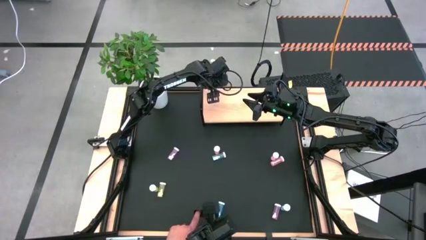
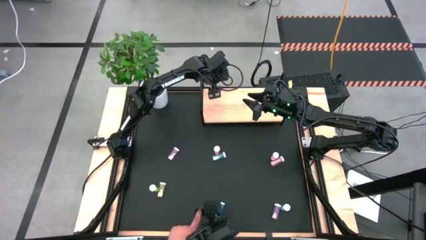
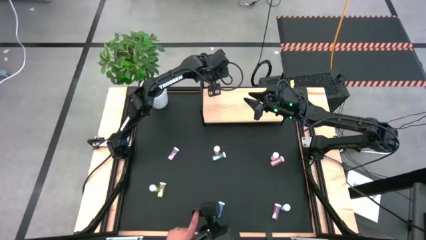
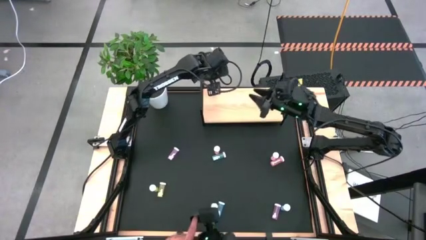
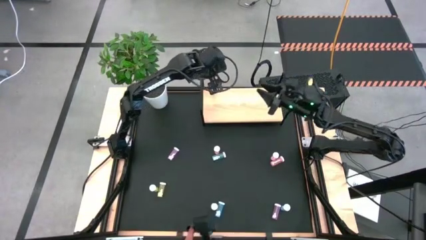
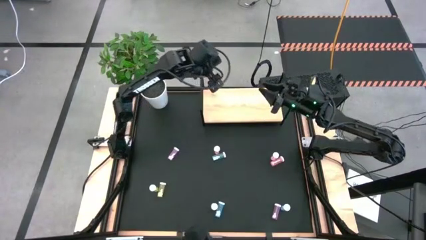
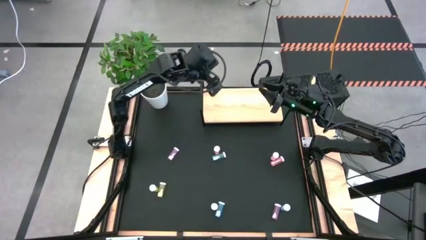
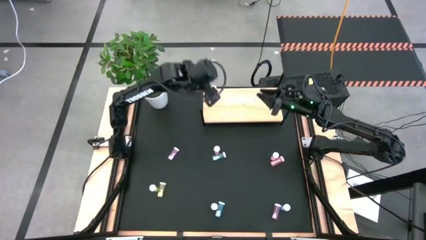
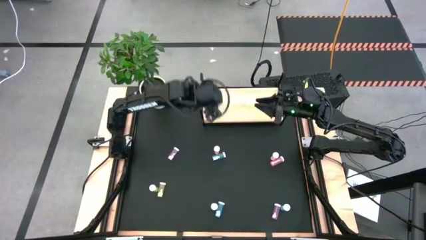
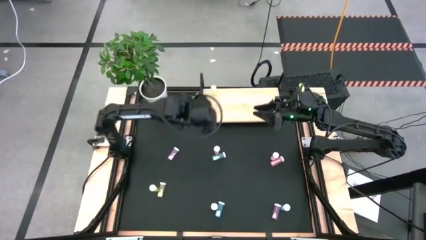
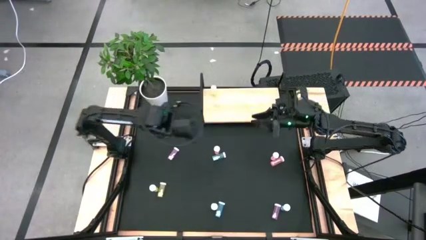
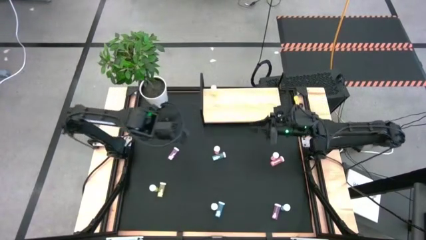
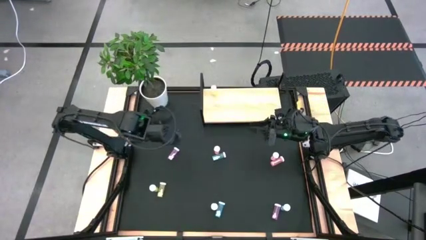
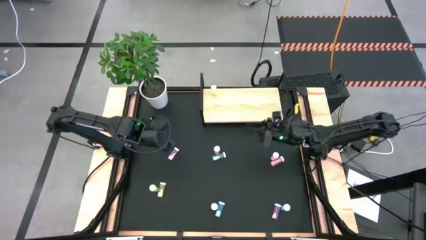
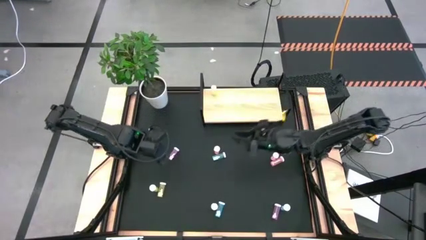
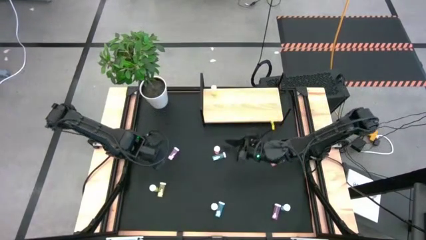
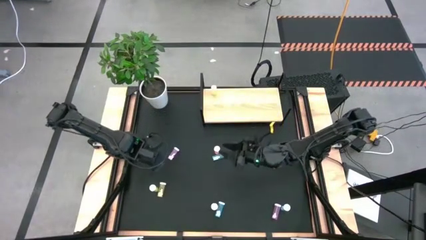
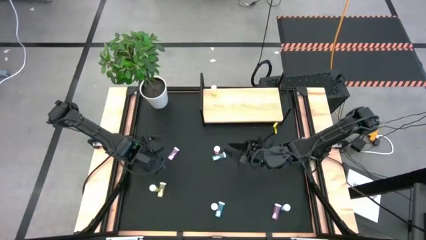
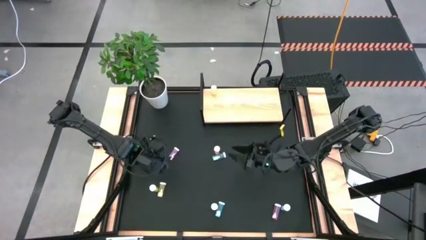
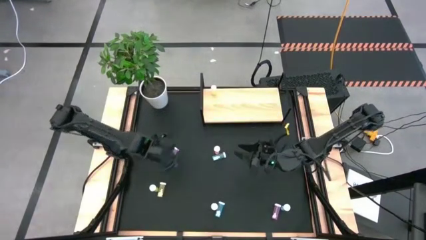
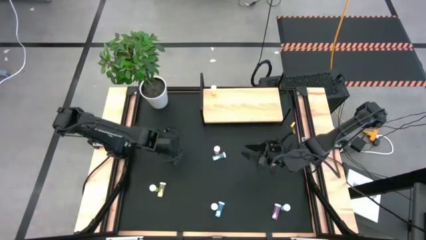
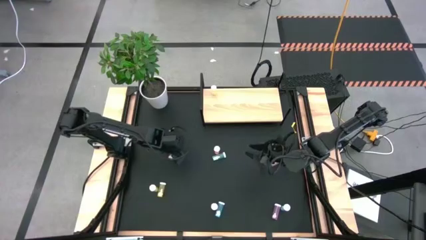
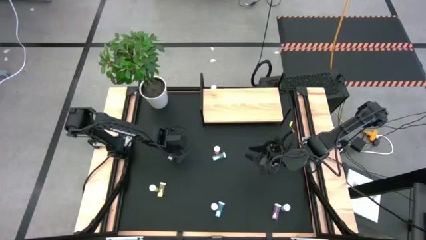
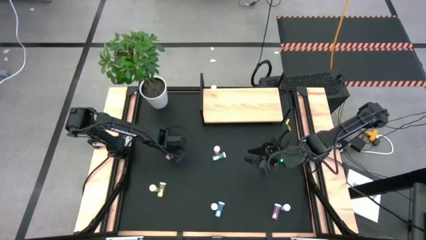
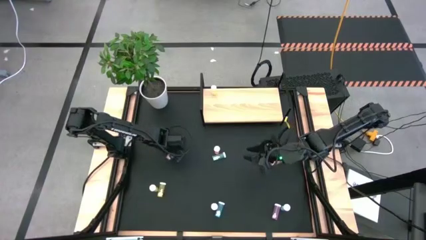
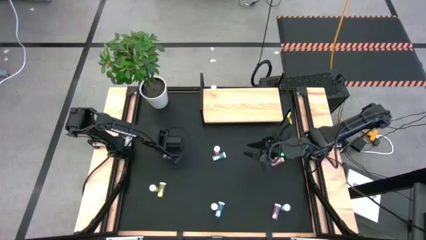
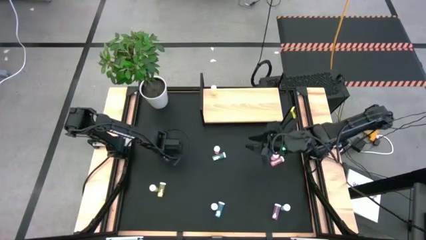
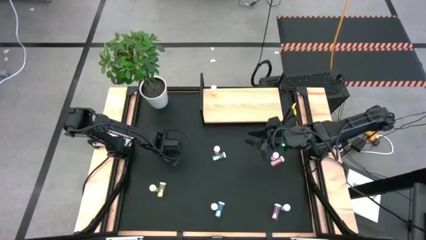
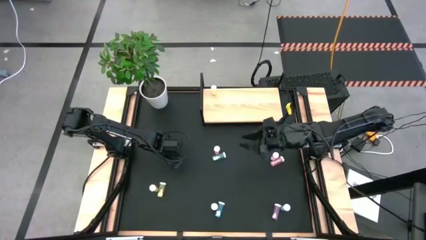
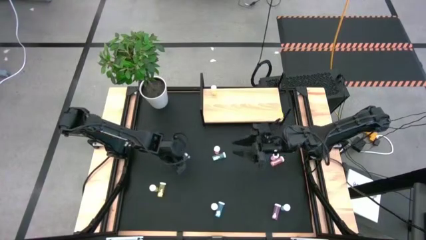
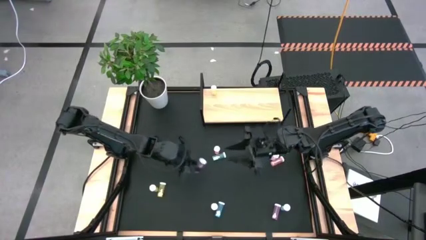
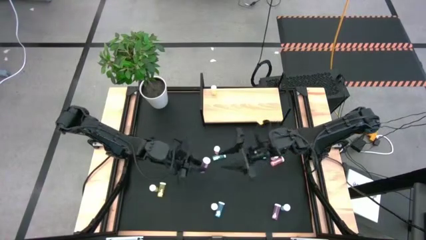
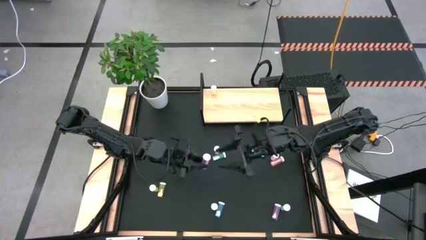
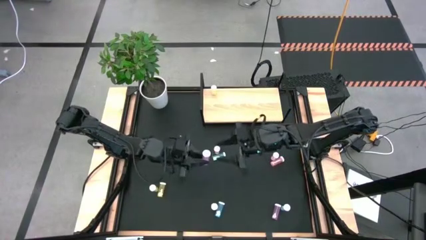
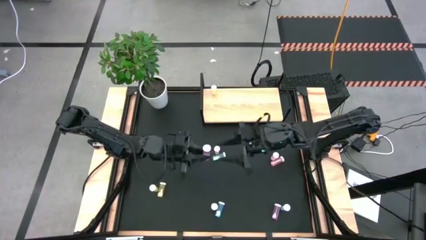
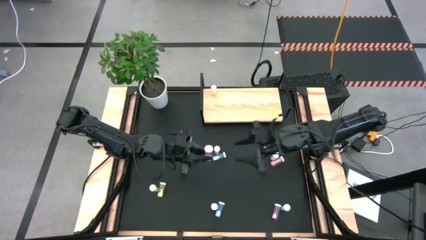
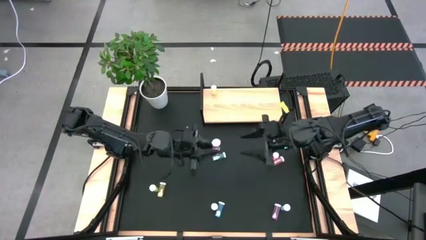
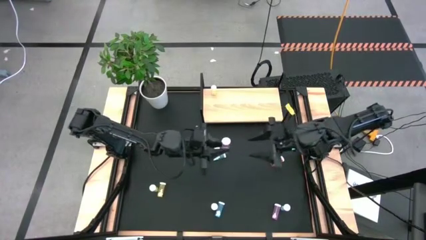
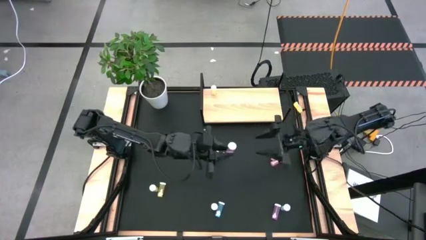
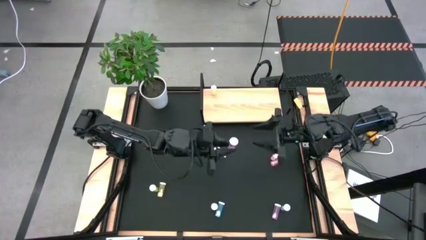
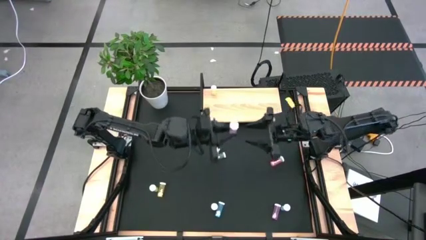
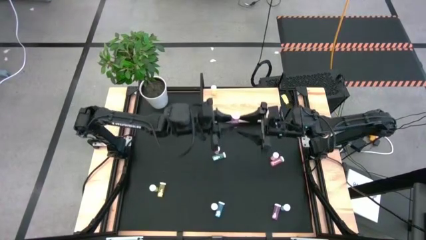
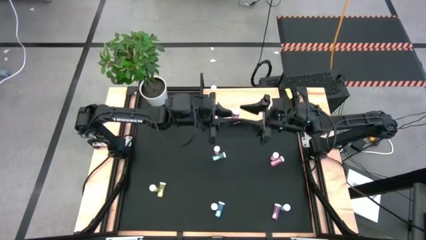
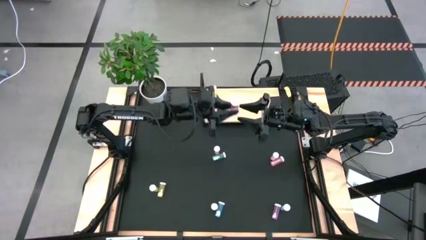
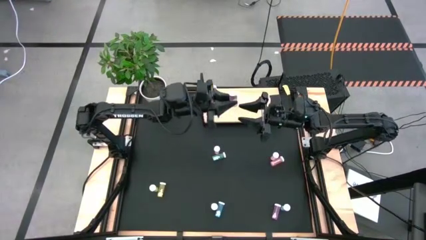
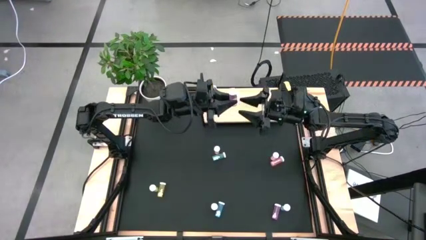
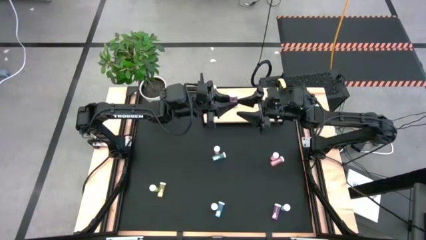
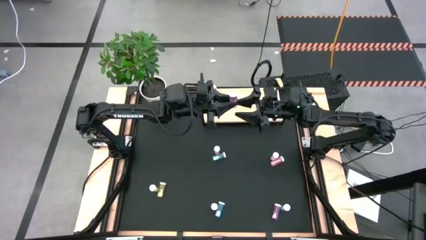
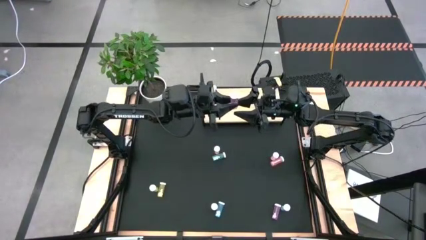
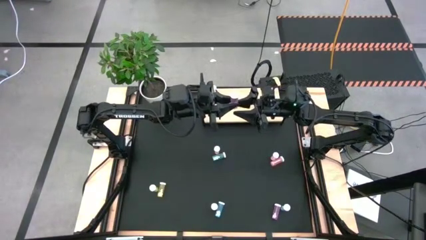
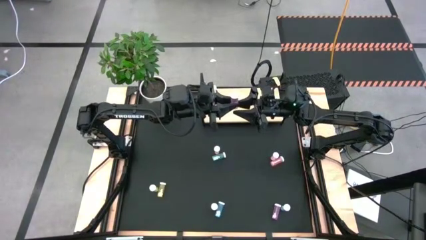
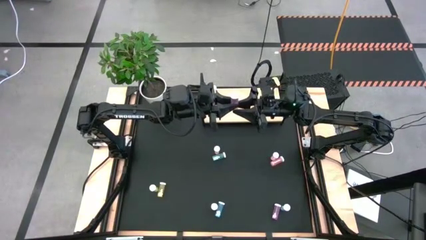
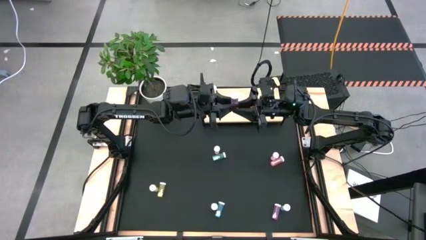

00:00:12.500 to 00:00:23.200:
Task: Pick and place medicine bottles onto shelf by color
Put the top left pink pill bottle on the shelf

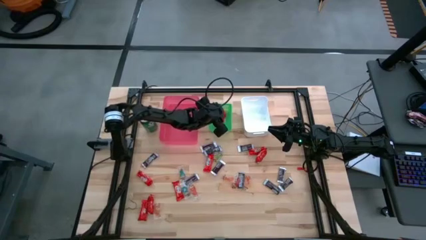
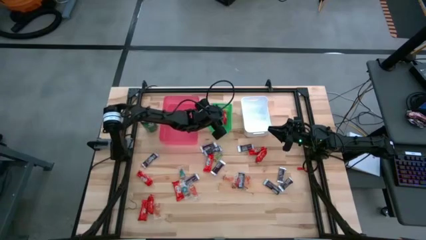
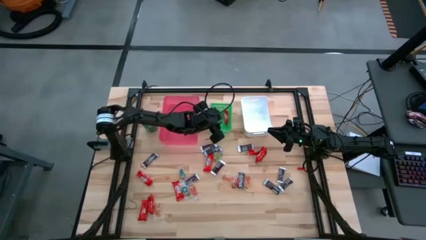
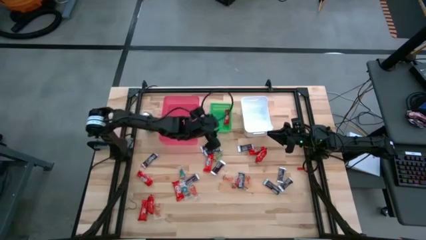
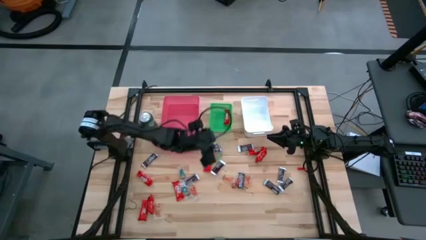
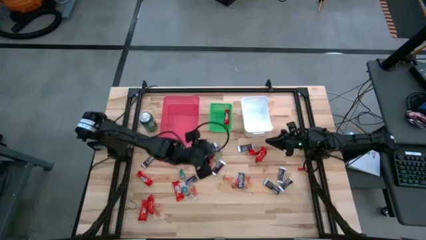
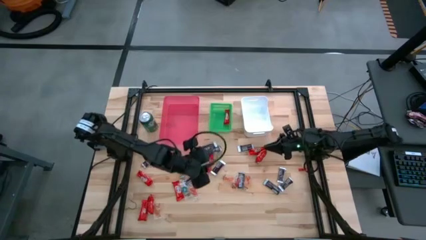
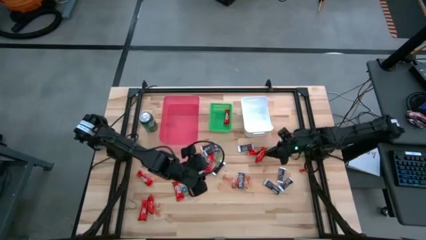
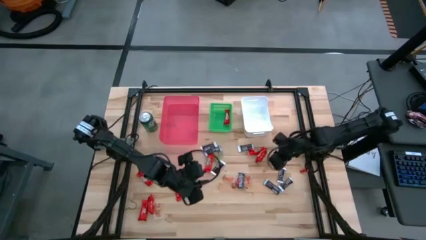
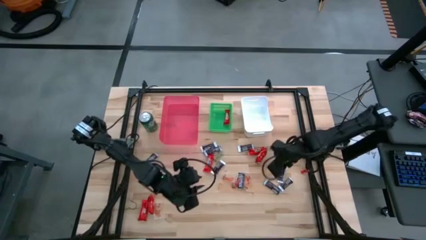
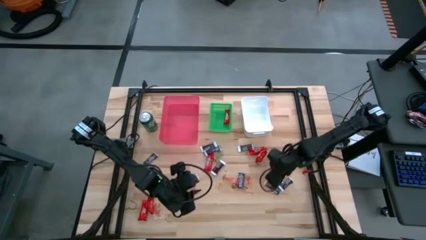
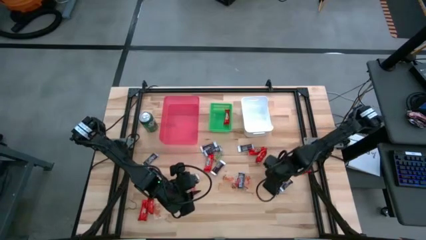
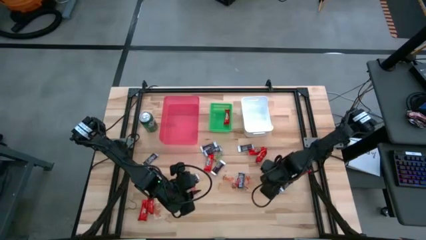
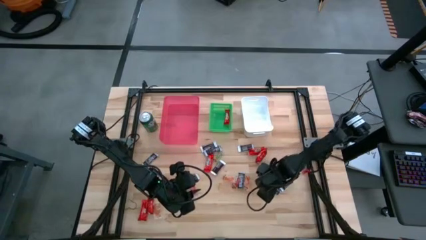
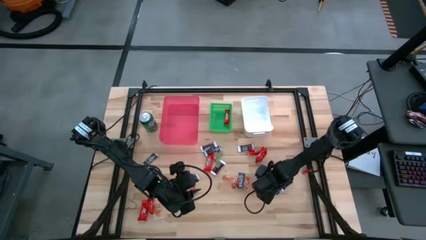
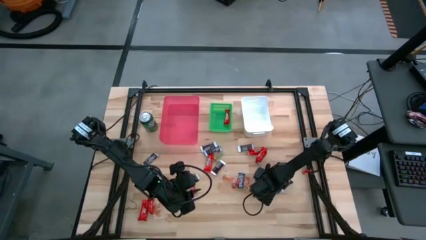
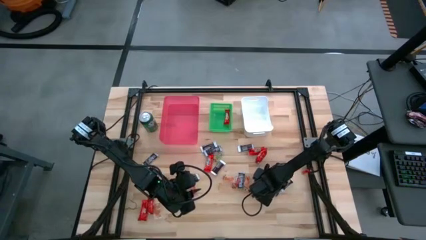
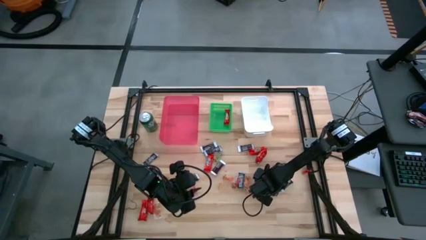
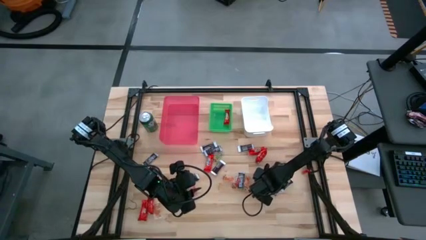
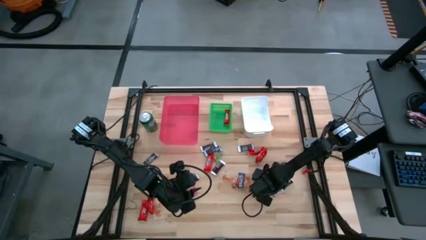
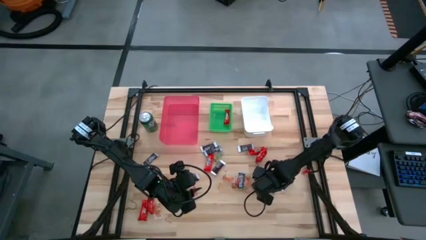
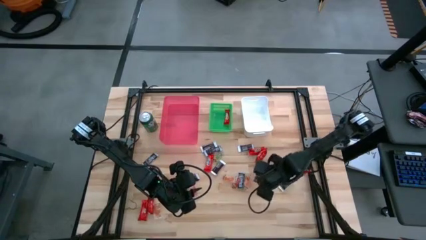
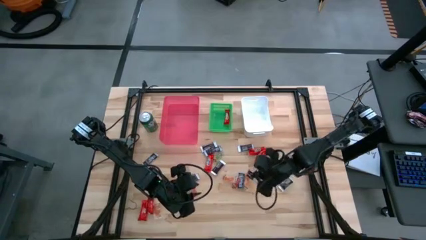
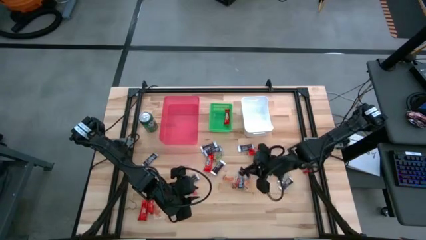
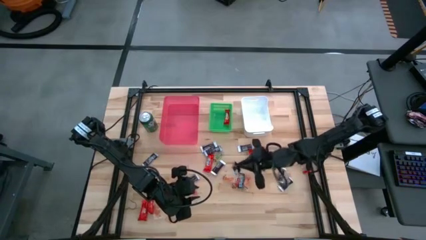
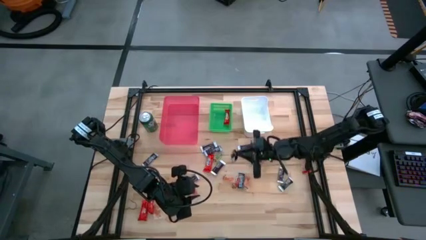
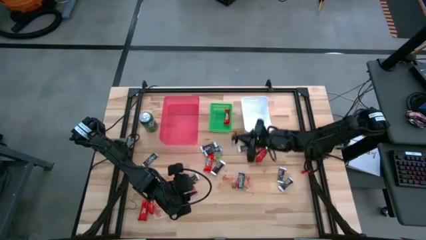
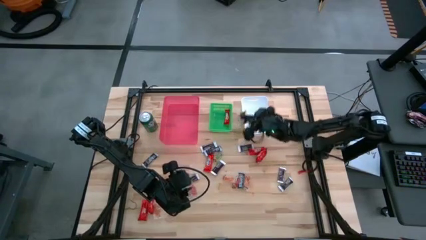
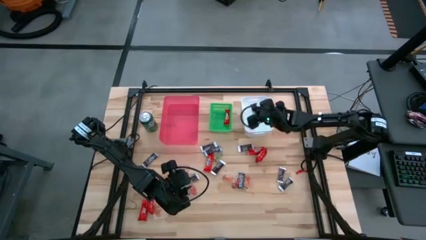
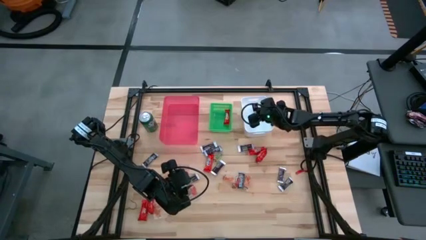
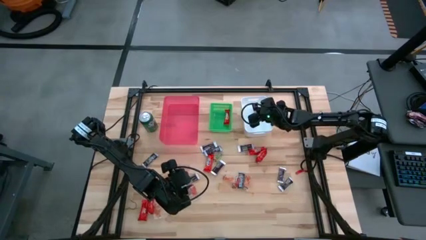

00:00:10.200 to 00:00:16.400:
Task: Sort candy
Put the brown chocolate into the white bin
